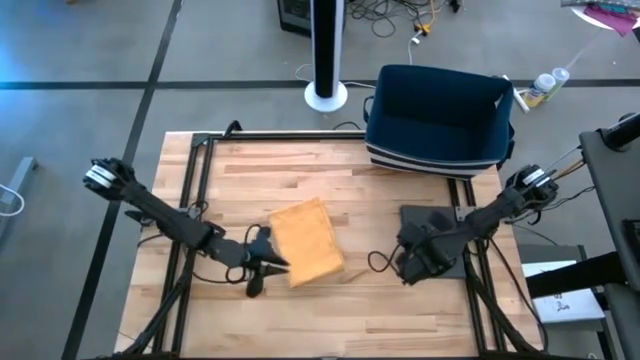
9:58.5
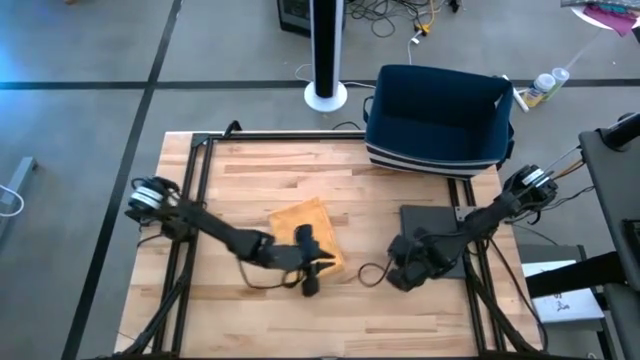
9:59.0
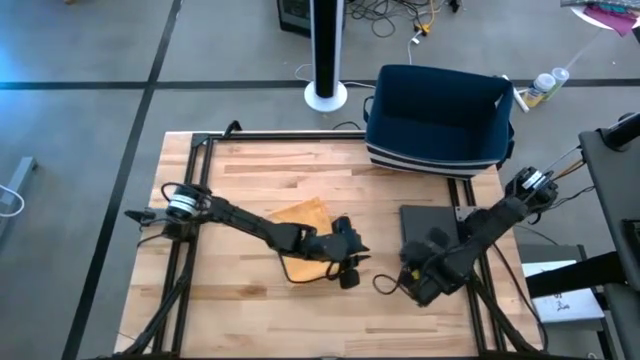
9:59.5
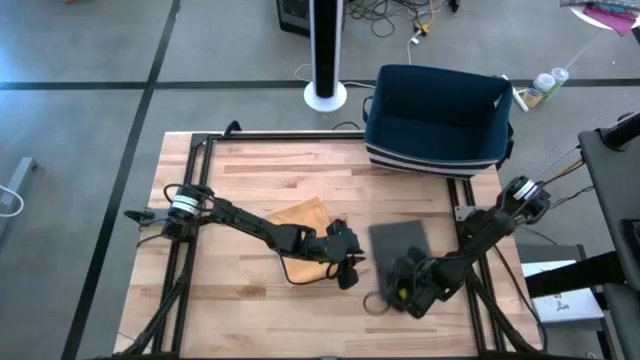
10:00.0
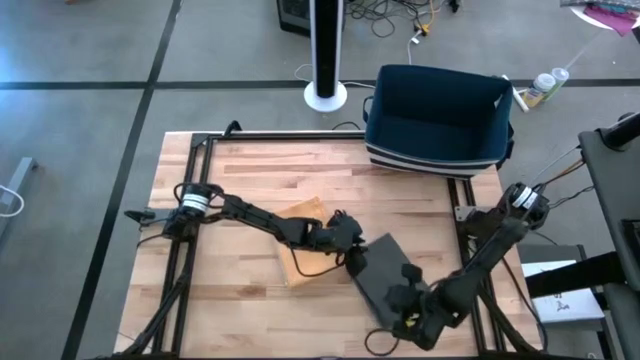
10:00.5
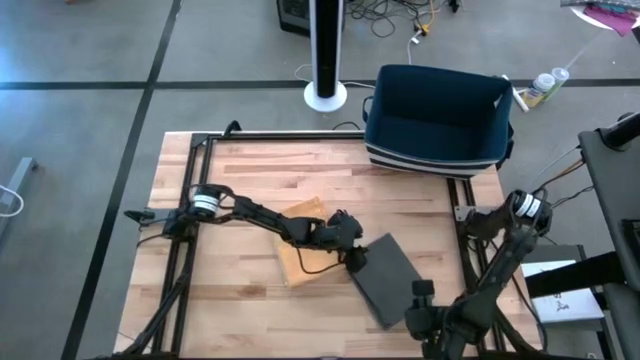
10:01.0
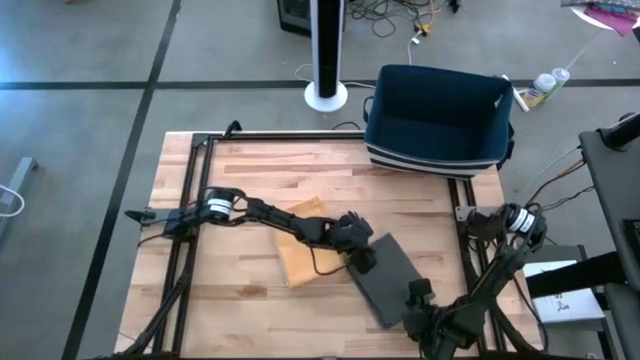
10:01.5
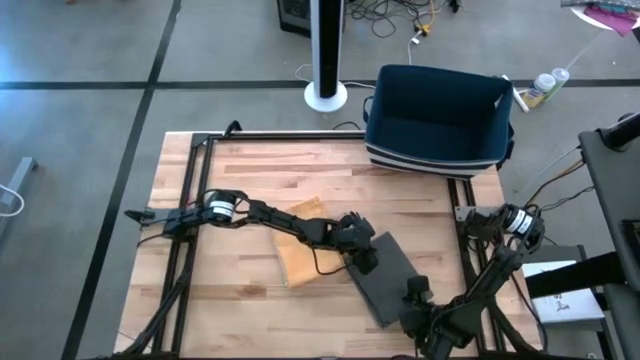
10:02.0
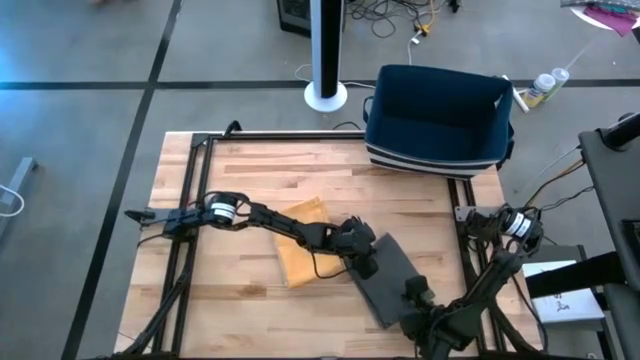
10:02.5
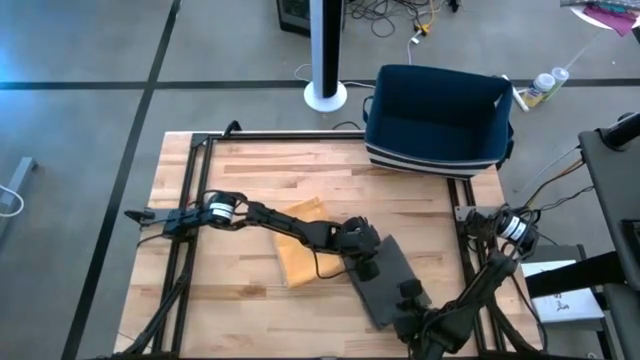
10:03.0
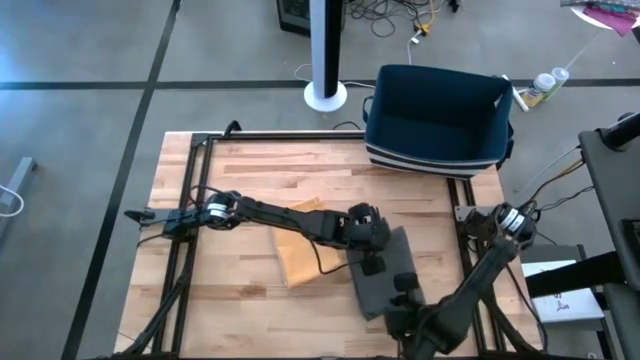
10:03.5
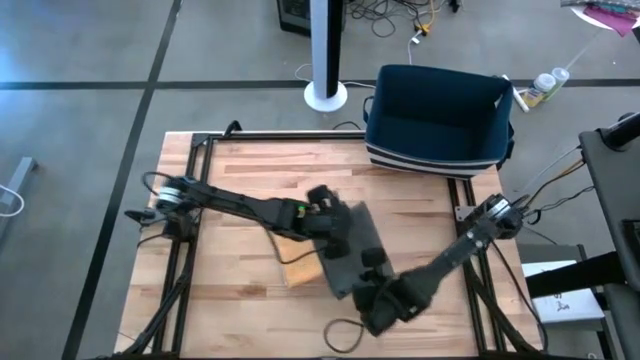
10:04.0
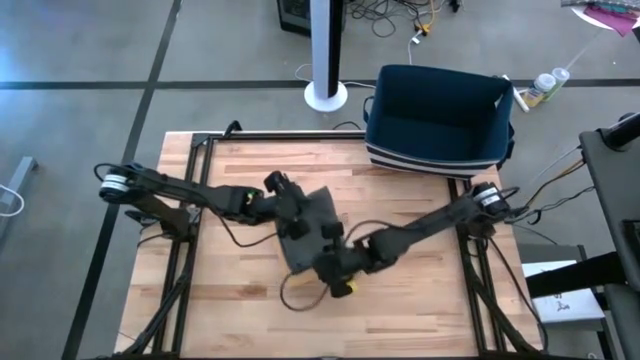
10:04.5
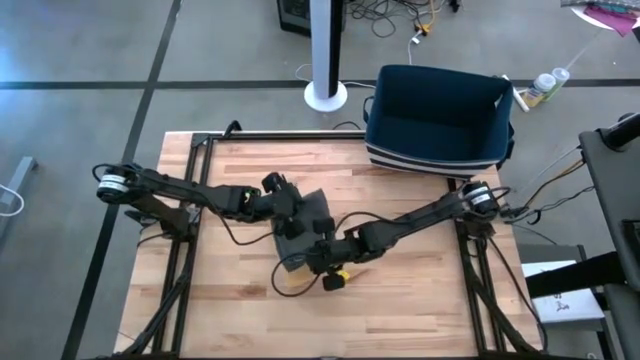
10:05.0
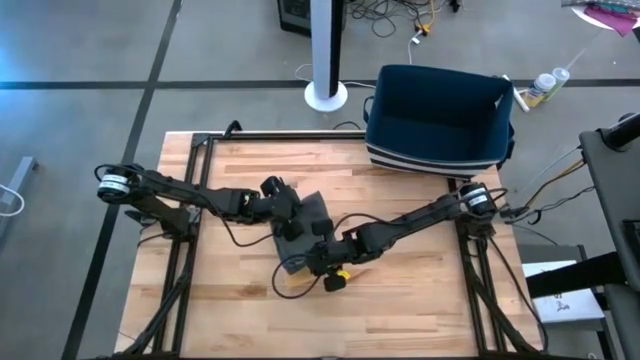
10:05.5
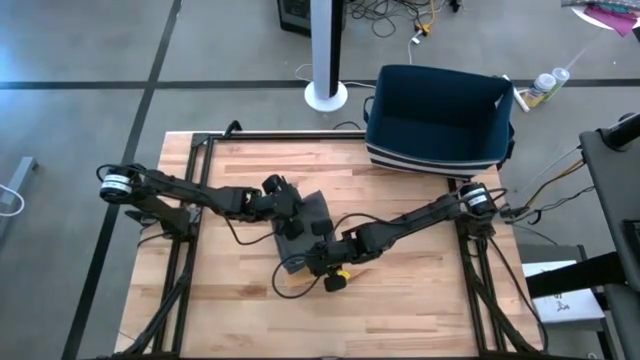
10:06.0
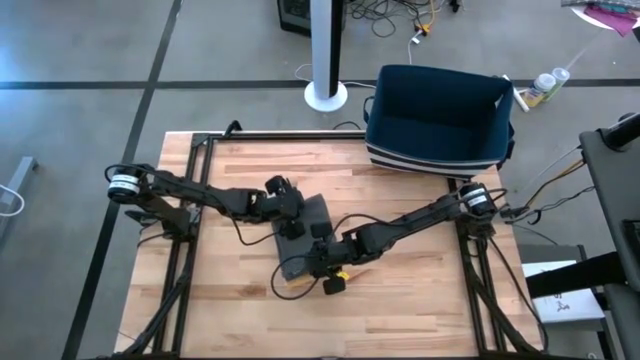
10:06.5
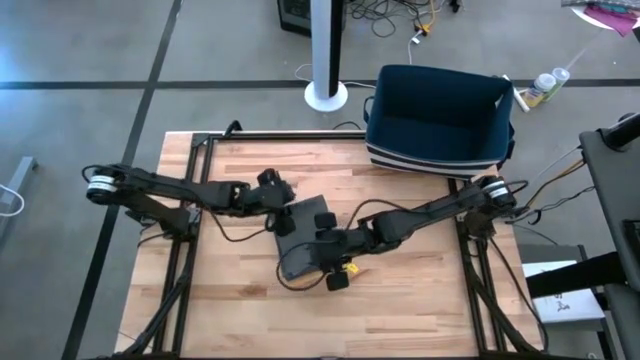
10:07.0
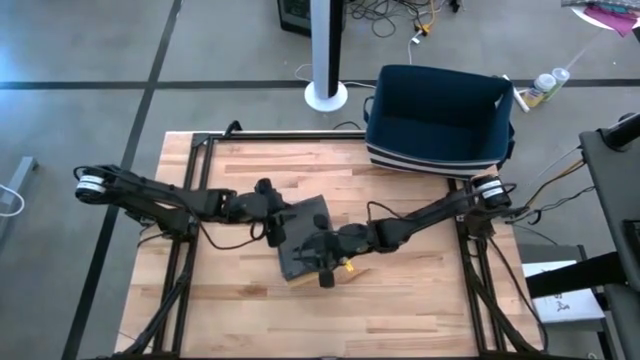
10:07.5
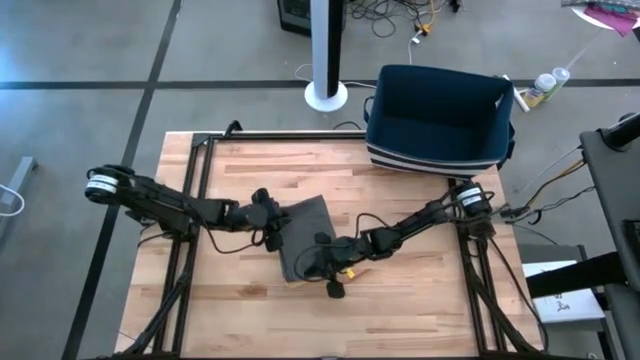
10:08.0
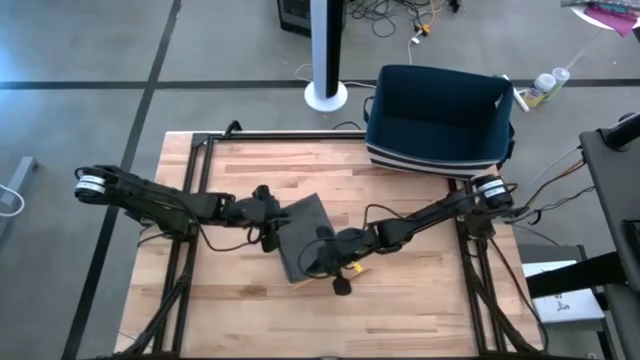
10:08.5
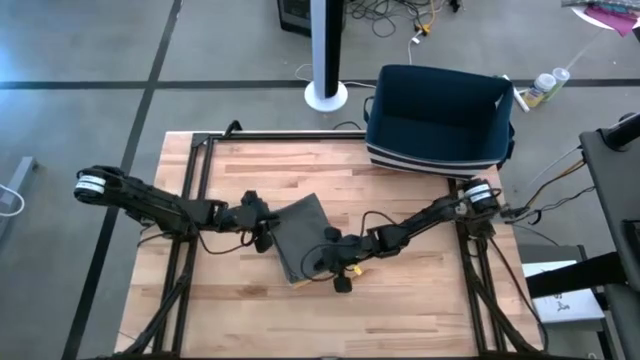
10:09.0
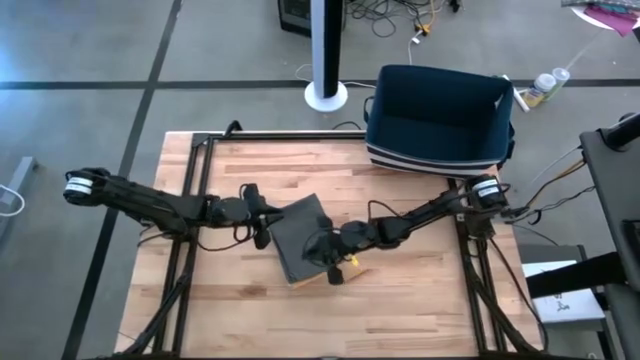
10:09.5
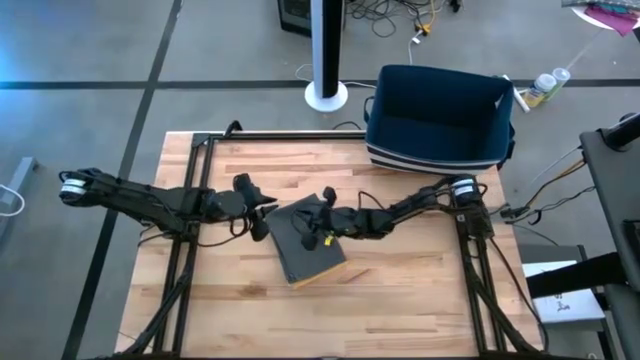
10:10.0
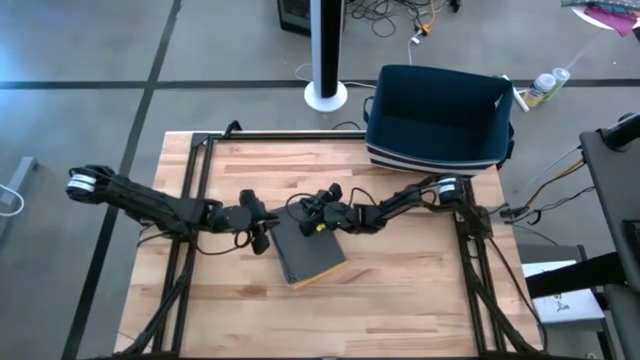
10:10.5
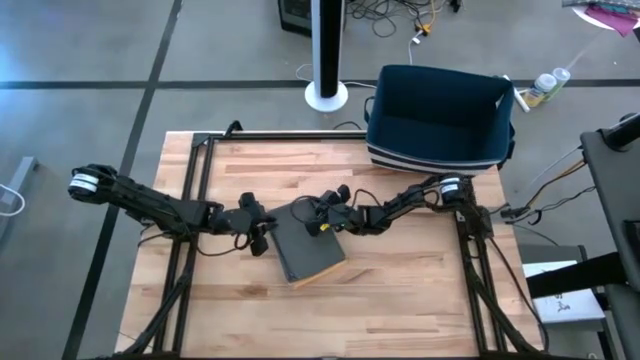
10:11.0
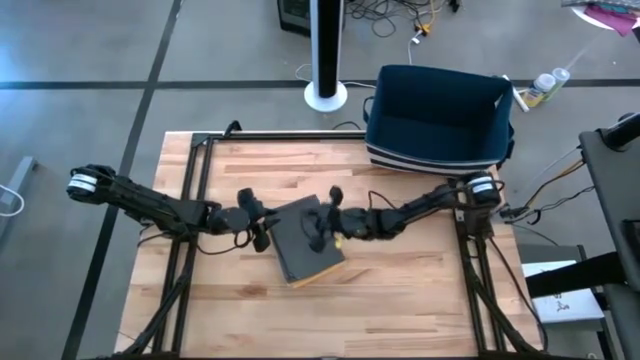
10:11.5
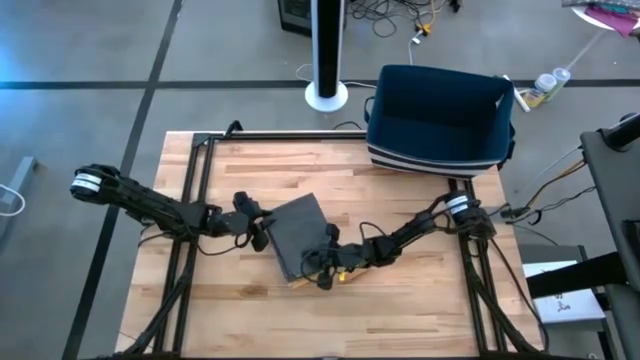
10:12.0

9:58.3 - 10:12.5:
Task: Fold towel
Stack the black towel on the yellow towel

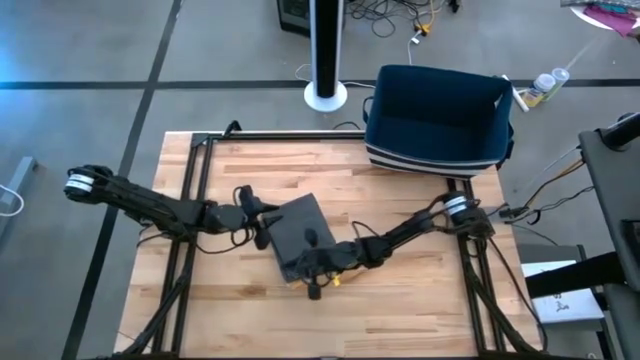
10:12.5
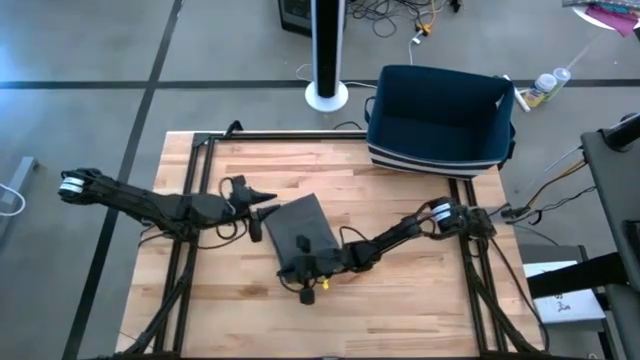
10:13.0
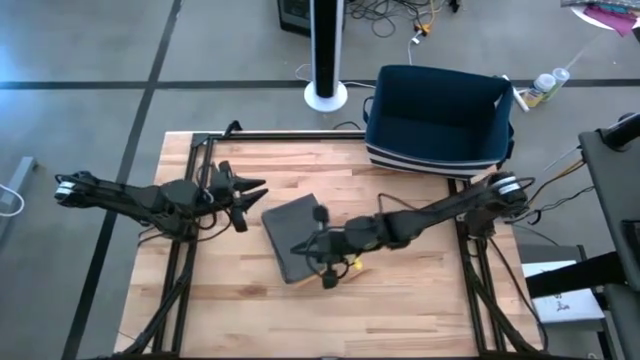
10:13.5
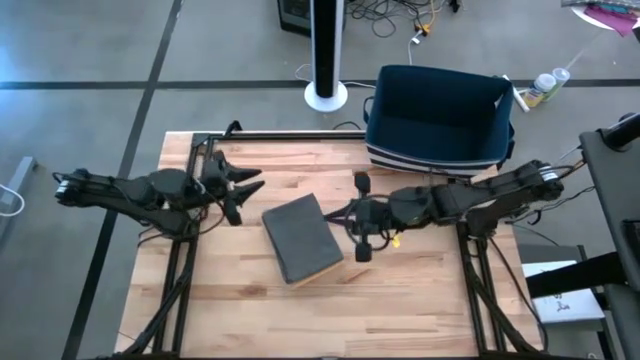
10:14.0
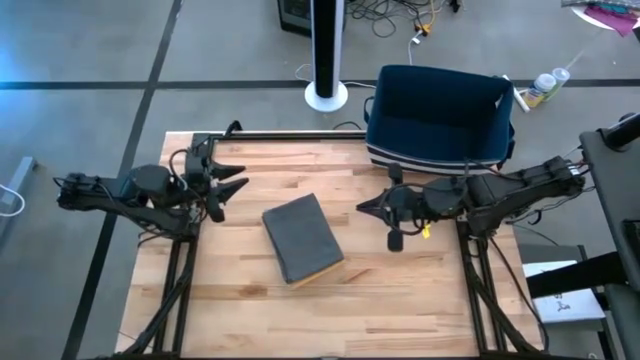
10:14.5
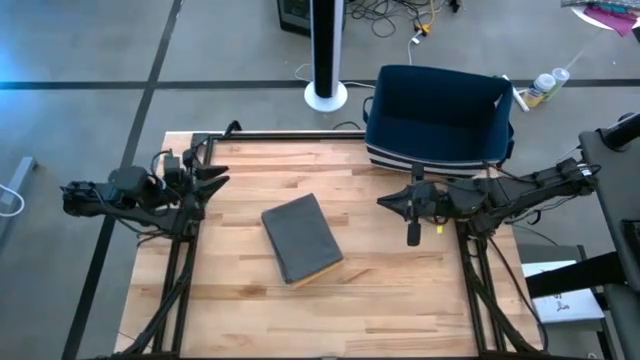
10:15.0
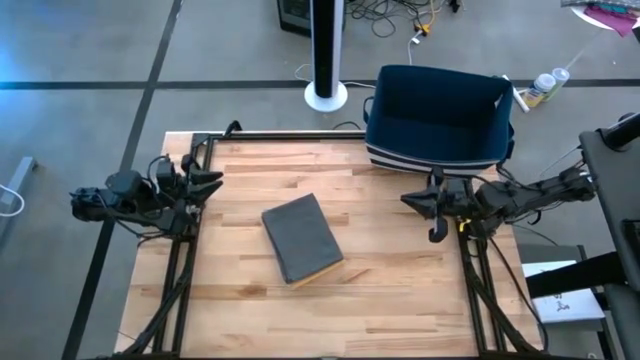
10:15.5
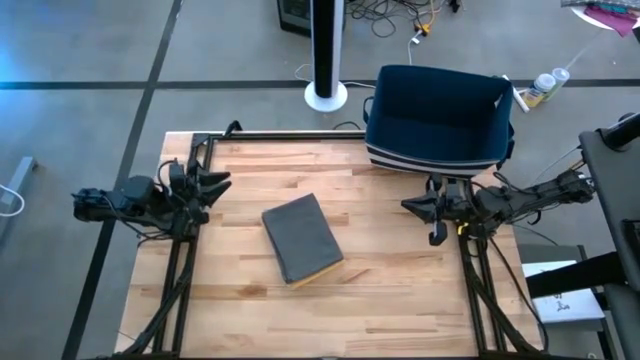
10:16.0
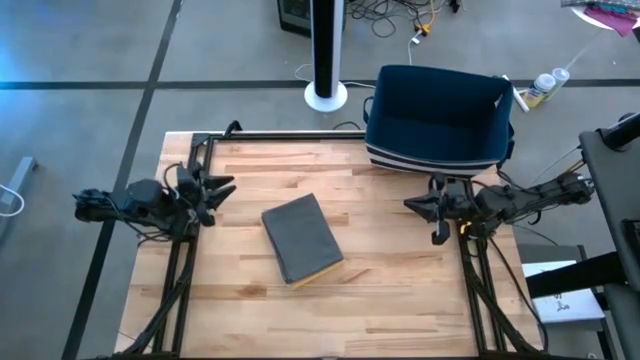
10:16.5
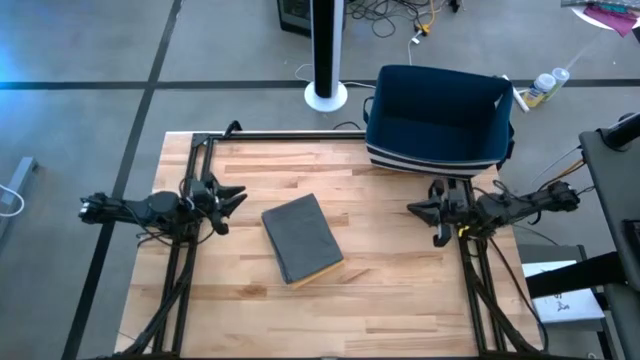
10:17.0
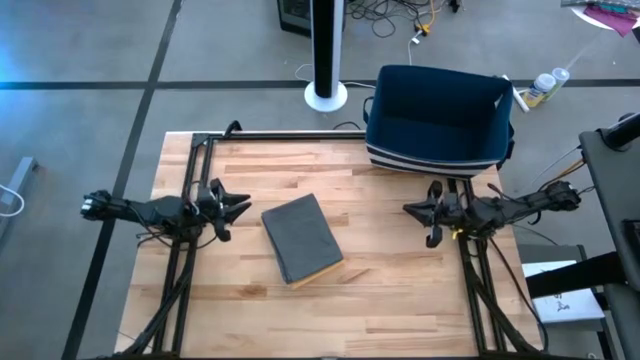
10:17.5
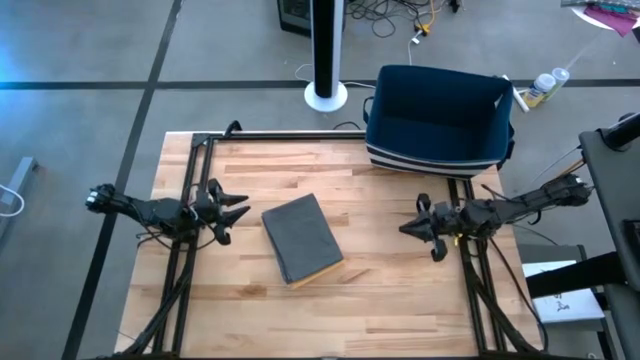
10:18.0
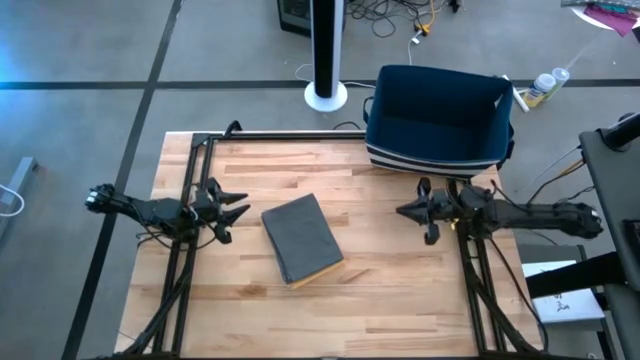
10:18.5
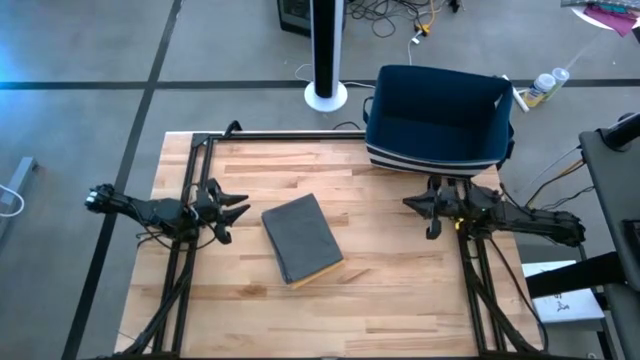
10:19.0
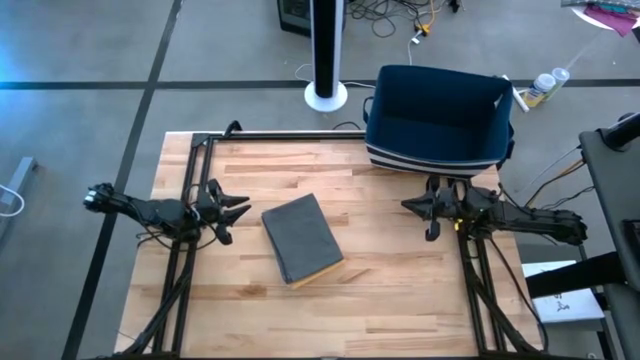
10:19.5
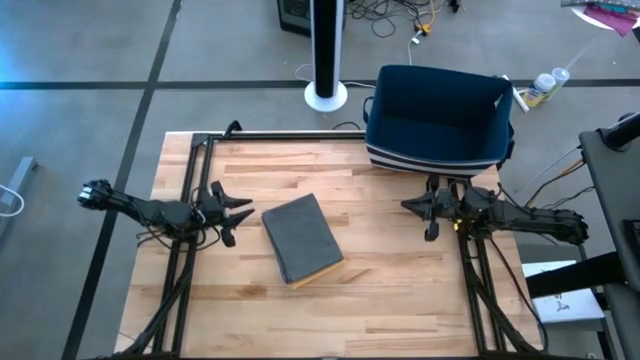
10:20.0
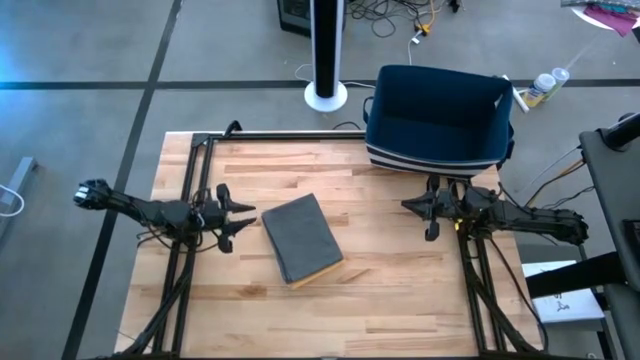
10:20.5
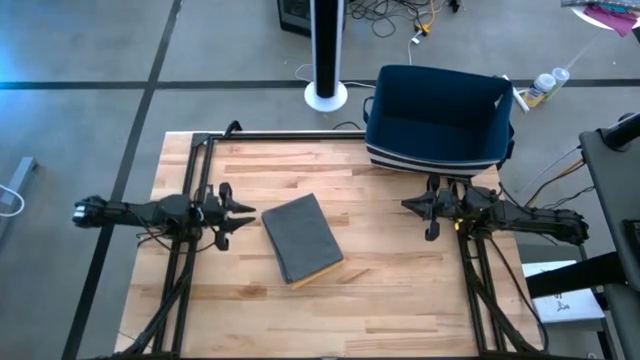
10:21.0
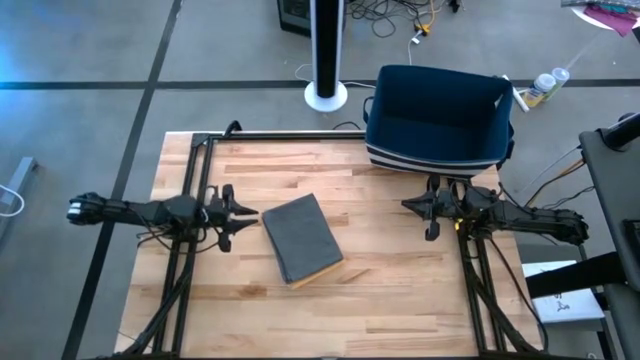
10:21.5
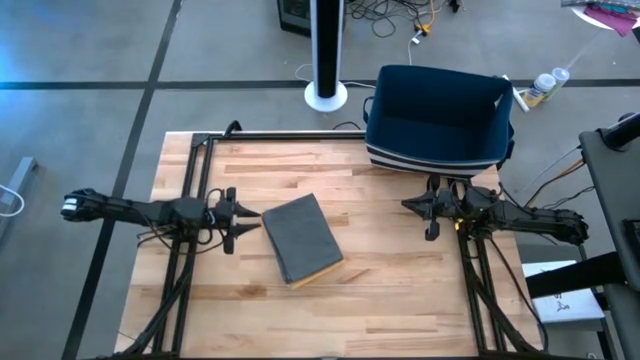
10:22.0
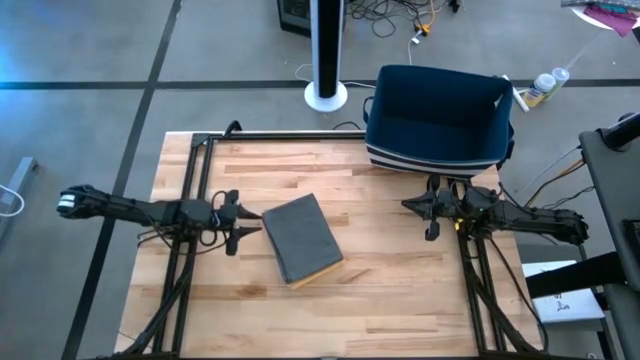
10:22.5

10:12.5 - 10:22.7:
Return to Home Position
